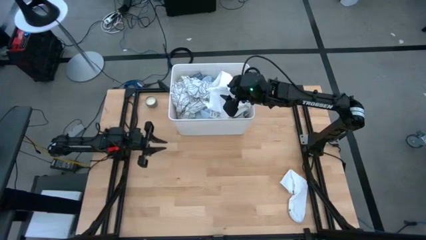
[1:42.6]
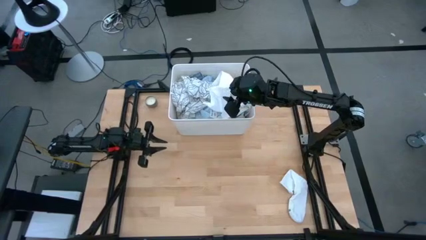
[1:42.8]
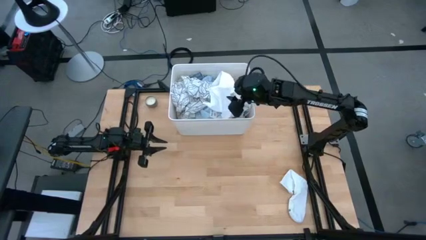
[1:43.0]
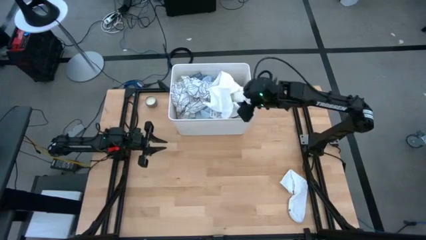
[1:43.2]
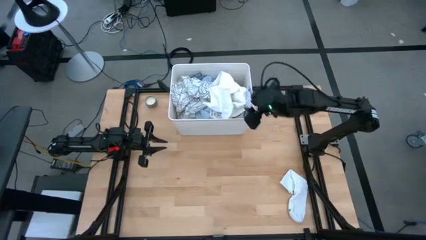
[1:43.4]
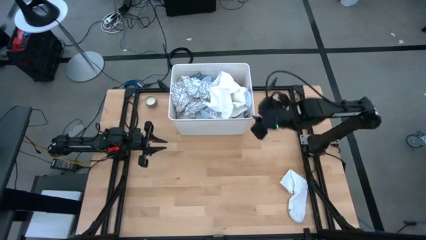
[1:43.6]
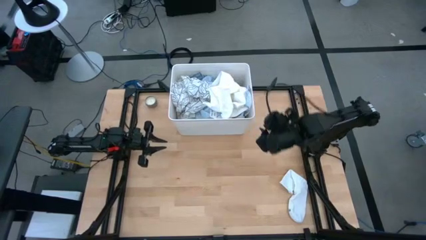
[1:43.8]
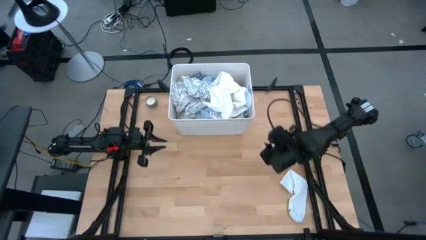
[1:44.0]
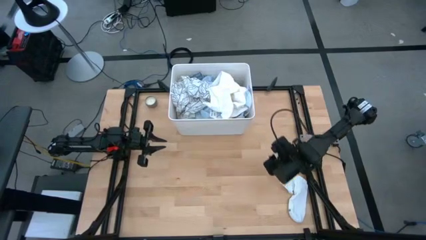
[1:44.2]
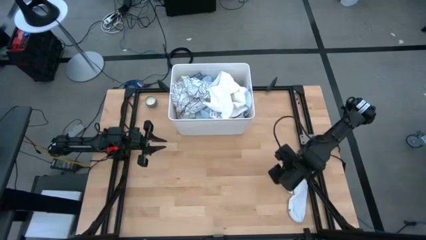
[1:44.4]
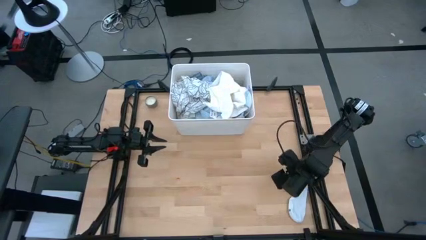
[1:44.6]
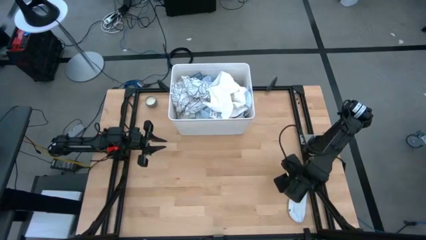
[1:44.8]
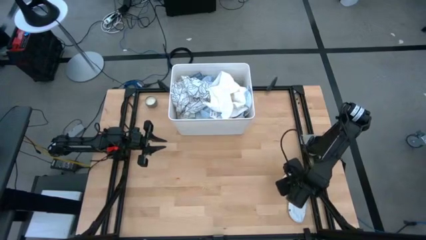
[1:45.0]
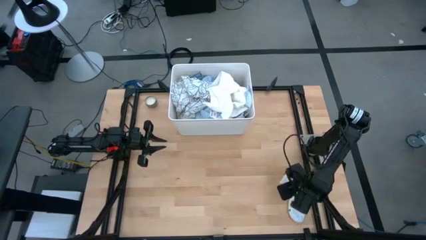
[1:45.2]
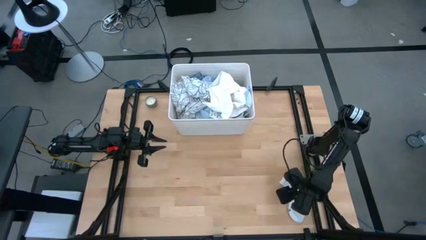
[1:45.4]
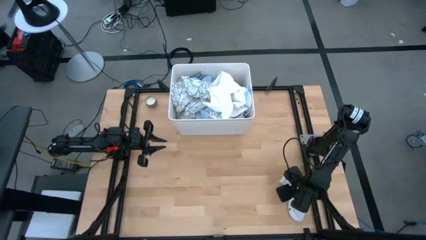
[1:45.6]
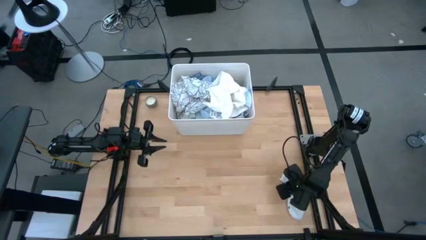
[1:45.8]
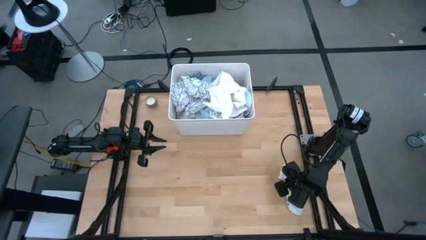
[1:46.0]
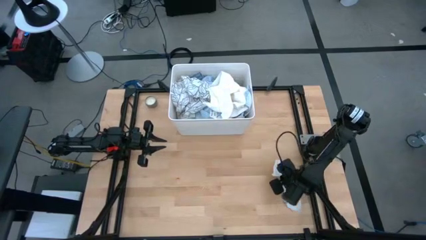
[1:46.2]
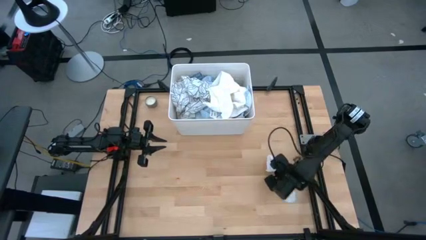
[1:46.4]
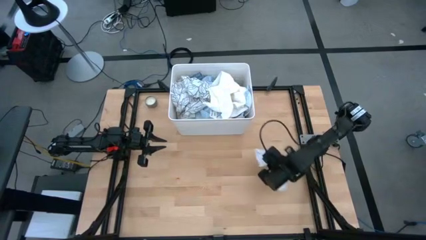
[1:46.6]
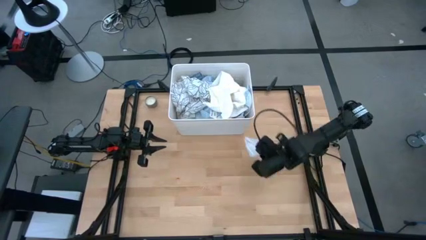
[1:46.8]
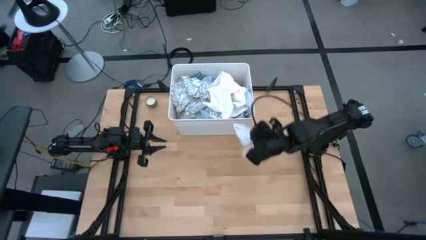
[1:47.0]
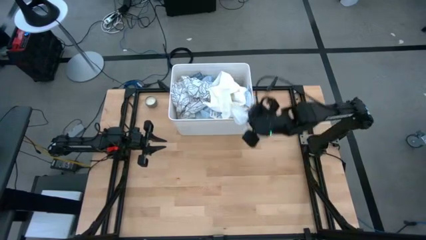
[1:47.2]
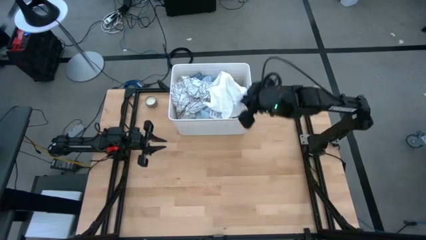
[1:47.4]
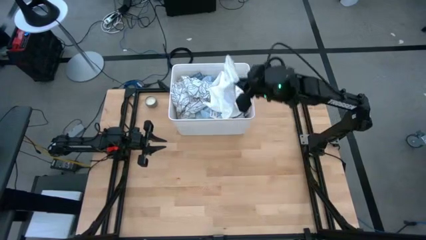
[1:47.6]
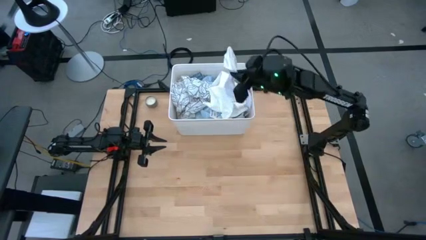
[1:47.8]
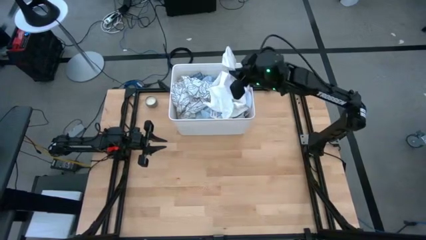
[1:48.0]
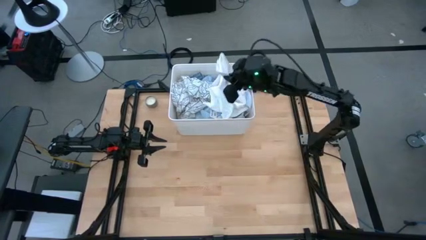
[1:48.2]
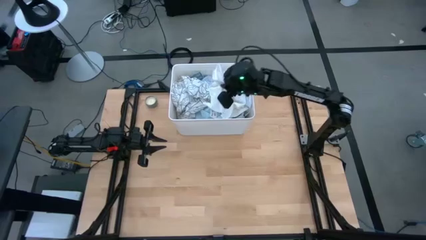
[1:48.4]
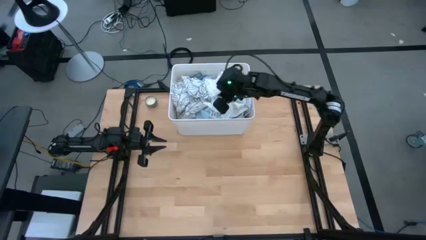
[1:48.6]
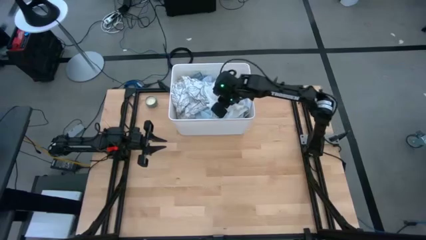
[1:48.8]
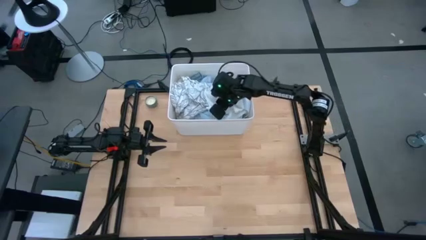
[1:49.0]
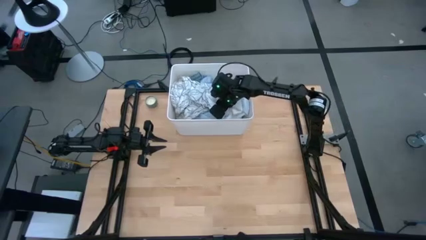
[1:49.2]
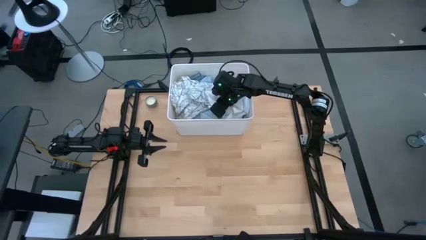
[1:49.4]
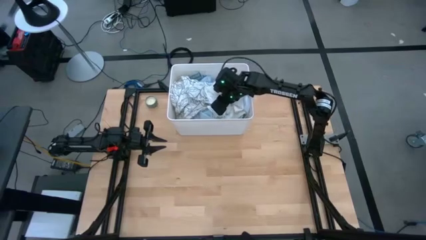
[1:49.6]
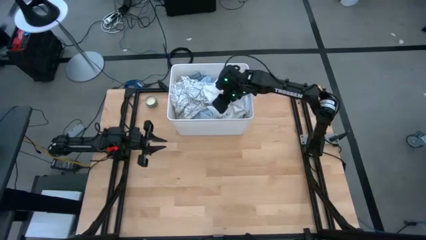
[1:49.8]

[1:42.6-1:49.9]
Task: Sort clothes
Put the white sock into the laundry bin

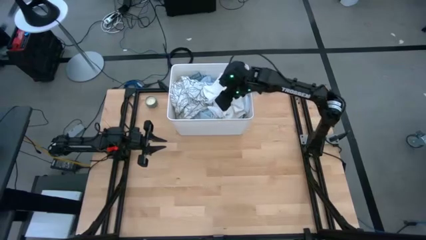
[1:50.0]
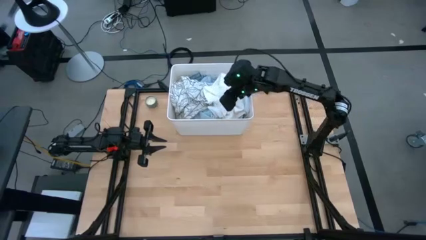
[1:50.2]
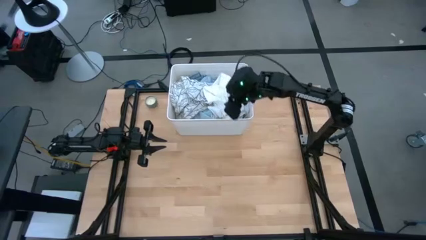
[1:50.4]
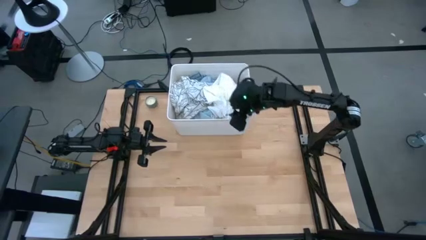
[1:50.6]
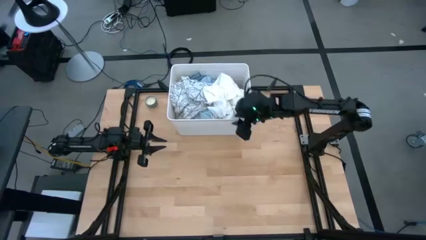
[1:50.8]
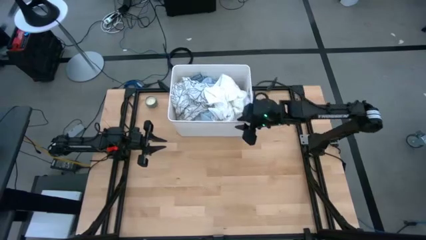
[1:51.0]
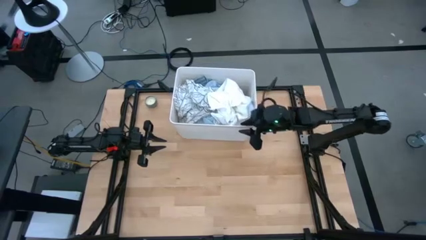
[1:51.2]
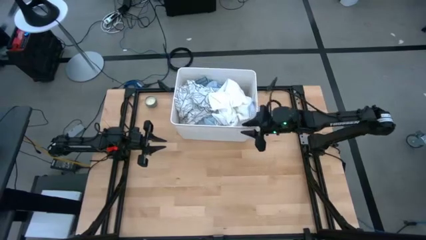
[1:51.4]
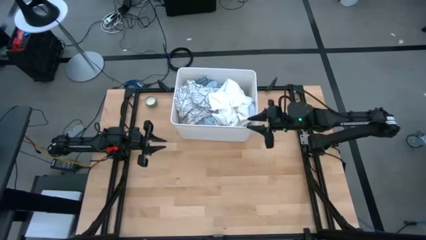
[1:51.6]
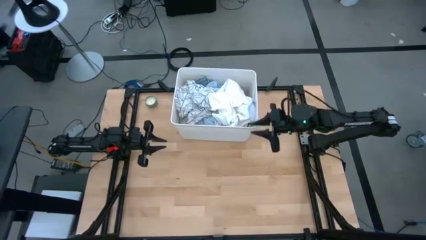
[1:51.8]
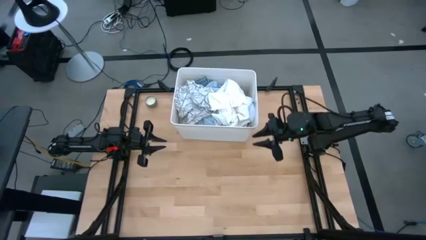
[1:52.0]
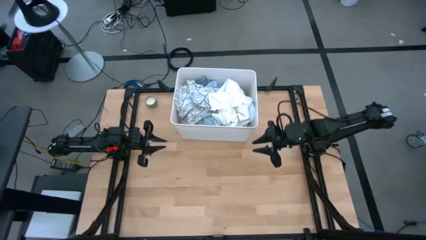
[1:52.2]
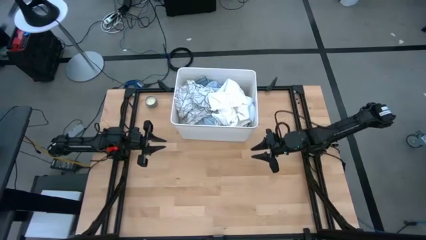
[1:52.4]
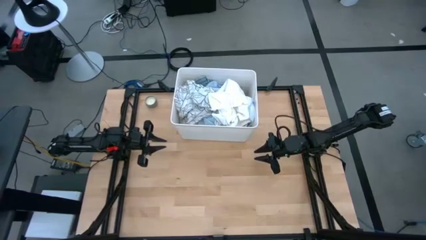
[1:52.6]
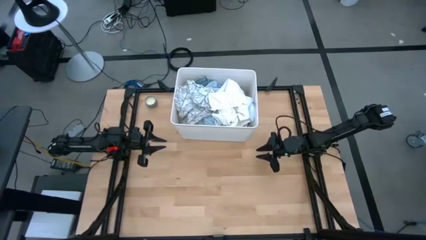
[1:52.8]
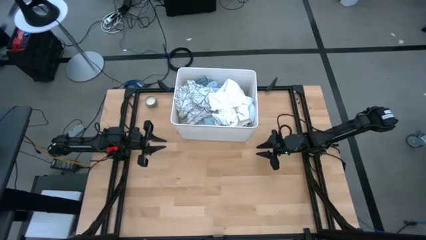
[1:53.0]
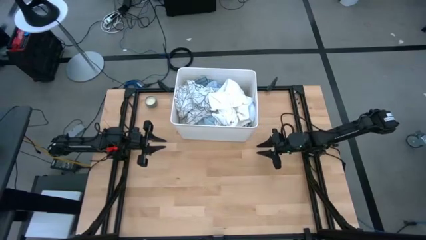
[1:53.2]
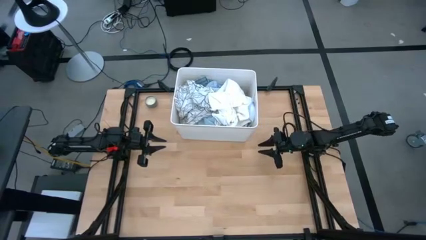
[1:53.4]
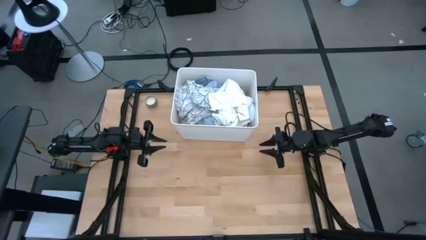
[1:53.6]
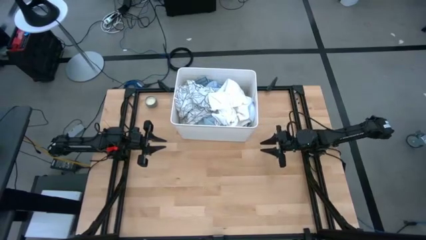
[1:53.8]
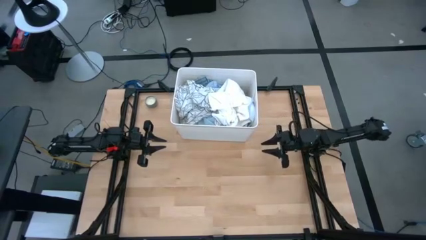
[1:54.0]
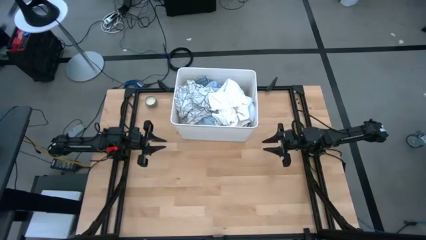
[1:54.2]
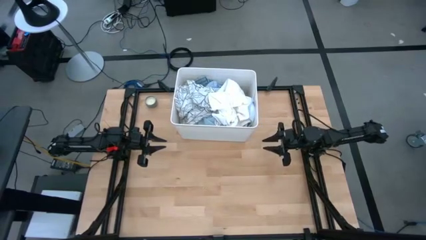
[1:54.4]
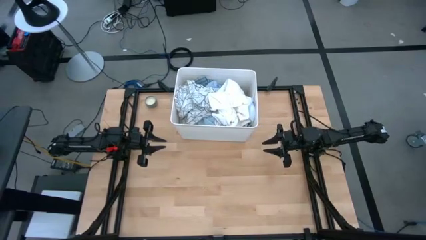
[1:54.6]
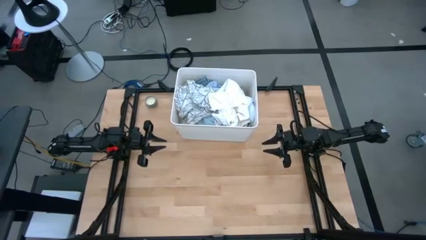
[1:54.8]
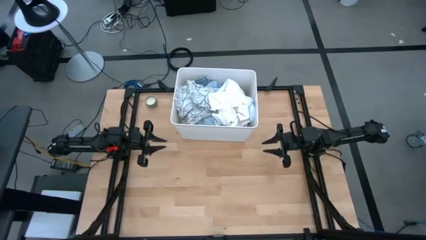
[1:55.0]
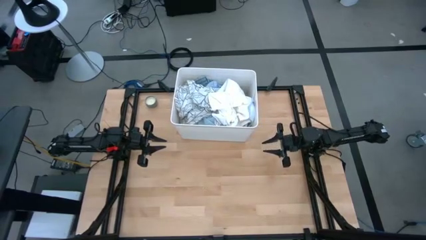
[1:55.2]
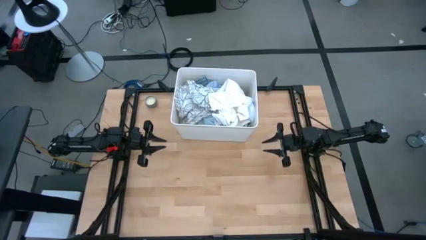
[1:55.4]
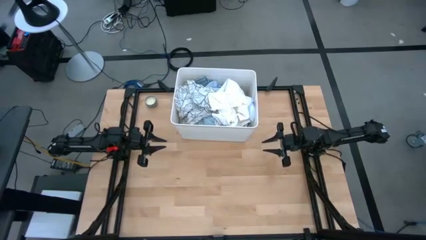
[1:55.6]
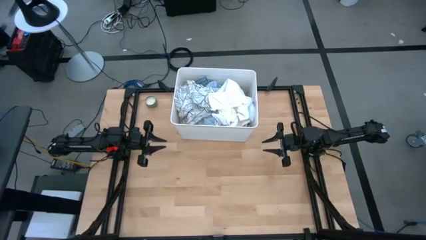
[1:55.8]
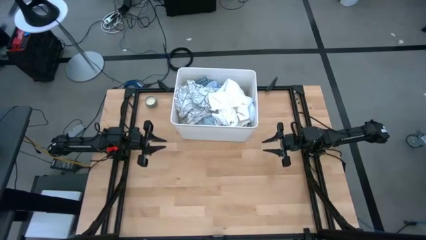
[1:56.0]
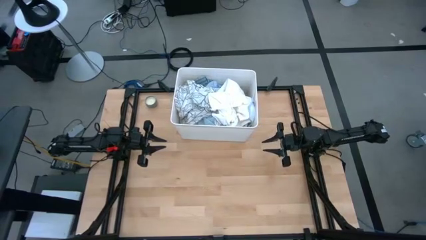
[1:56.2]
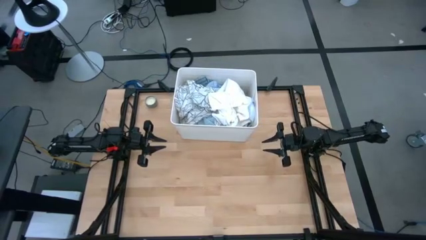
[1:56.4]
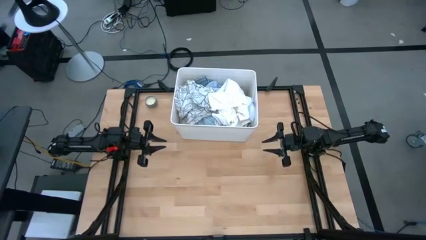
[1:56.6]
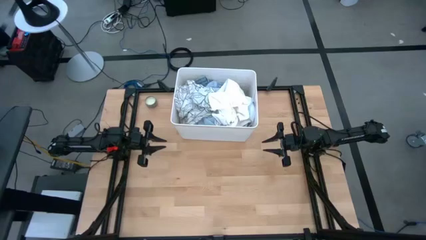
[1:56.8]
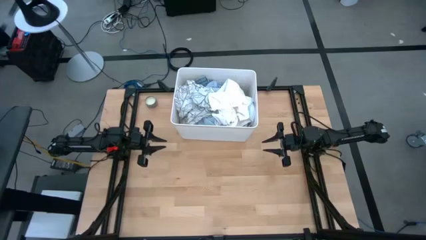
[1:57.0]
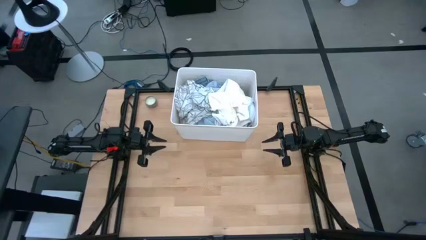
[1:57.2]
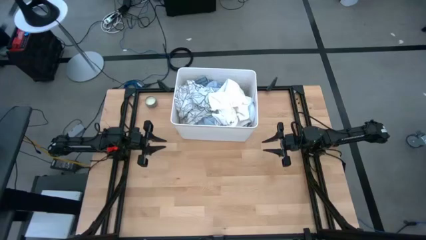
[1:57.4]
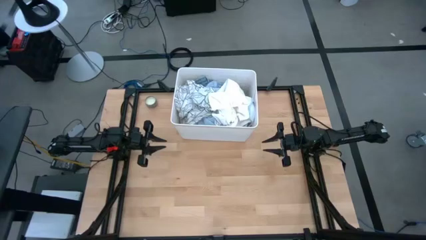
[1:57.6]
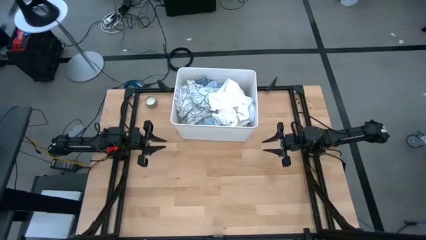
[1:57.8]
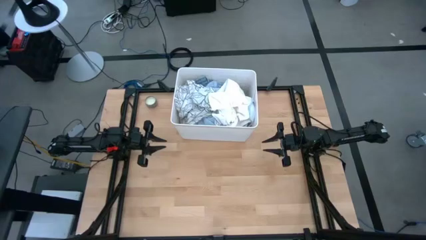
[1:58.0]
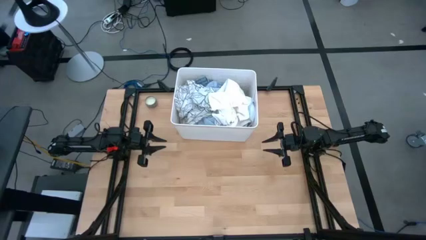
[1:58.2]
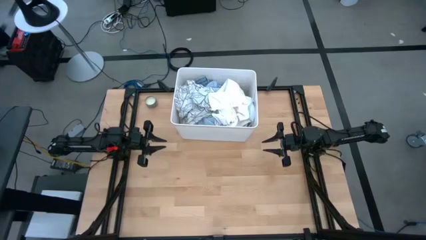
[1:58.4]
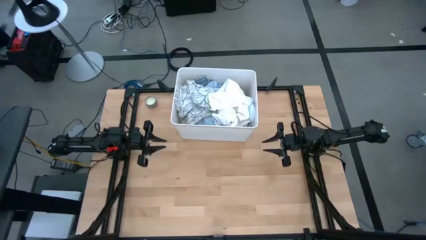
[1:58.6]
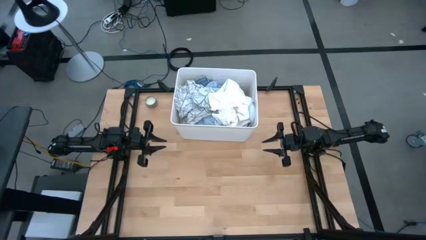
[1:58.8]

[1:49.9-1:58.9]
Return to Home Position

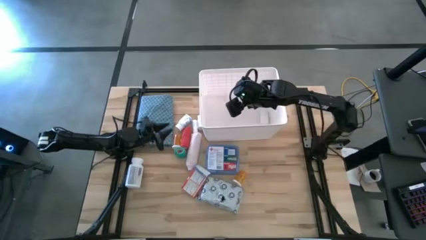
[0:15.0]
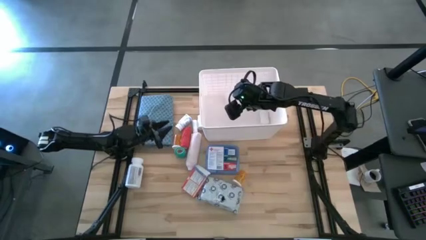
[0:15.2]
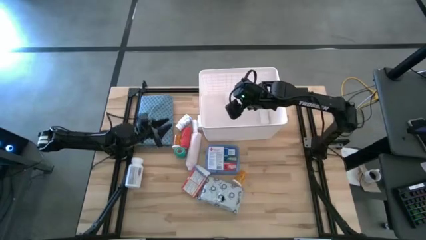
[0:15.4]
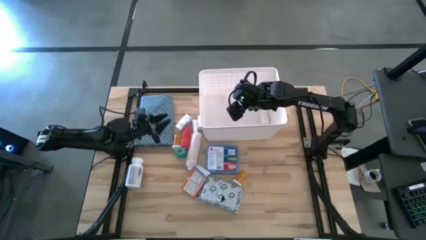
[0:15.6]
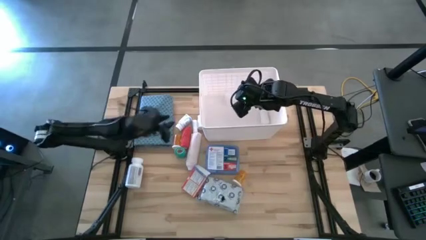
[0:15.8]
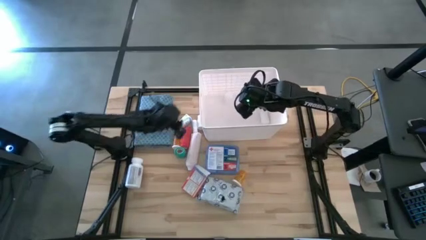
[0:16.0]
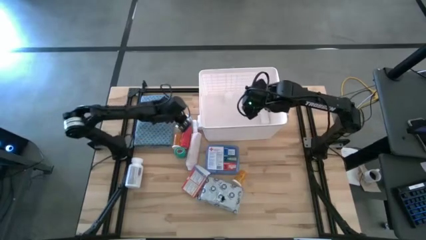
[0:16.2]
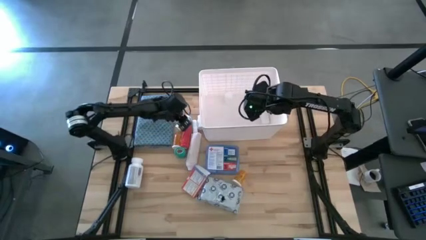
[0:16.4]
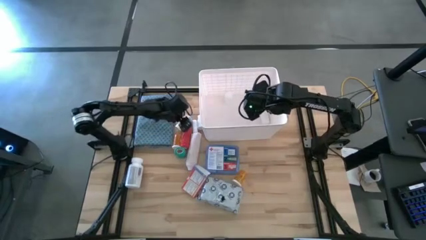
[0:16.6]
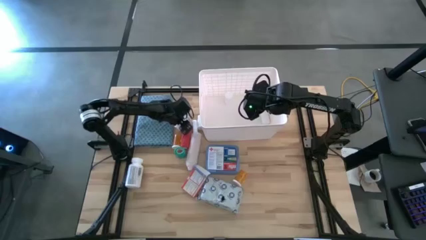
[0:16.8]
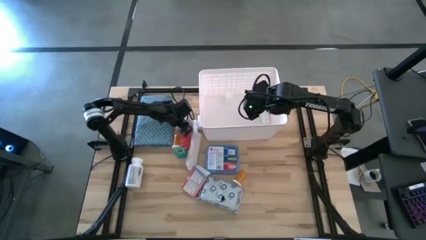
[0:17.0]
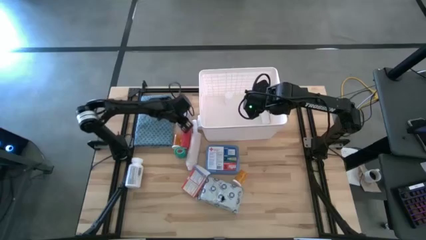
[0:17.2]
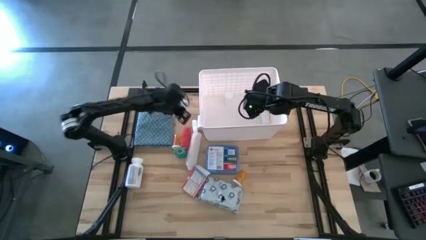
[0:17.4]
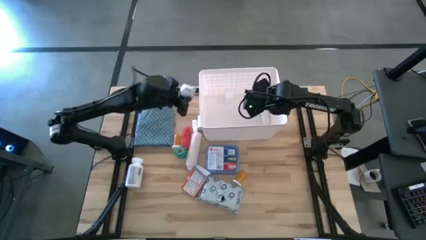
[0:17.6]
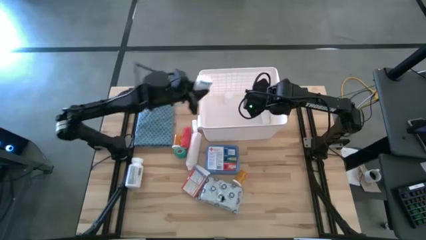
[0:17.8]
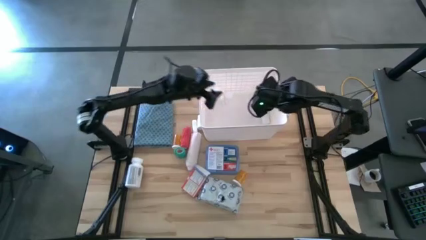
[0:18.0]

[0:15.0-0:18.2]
Task: Pick & place medical supplies in basket/bin
Put the white pill bottle into the white bin
